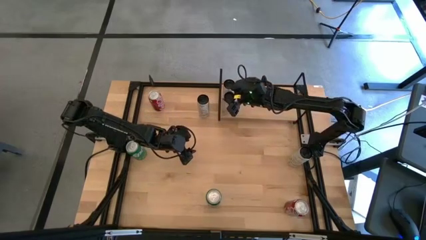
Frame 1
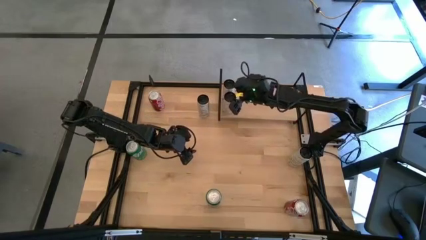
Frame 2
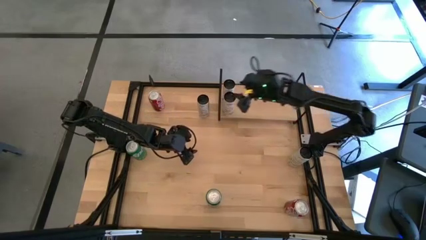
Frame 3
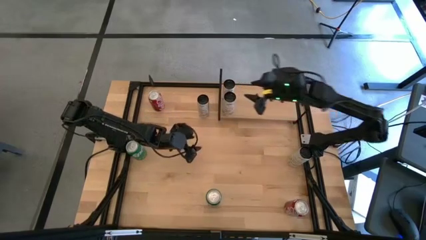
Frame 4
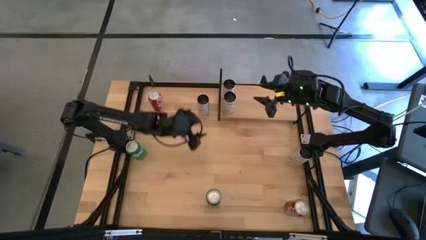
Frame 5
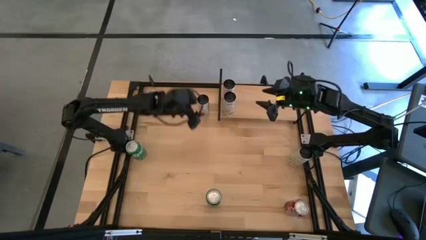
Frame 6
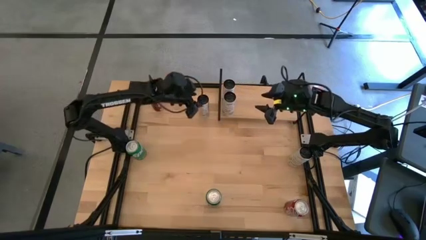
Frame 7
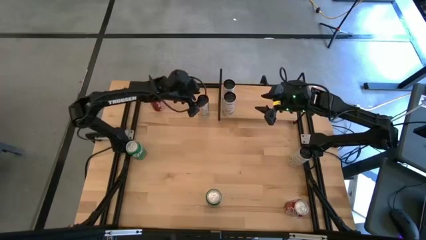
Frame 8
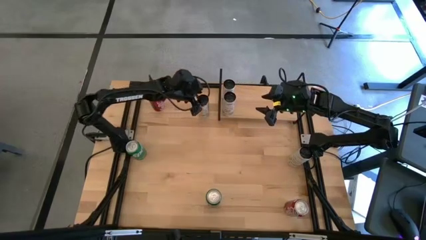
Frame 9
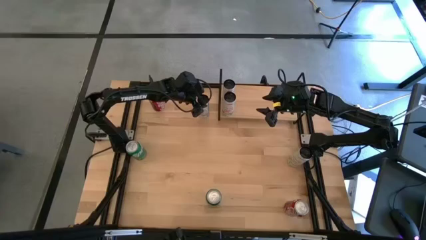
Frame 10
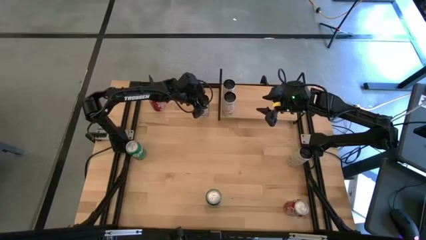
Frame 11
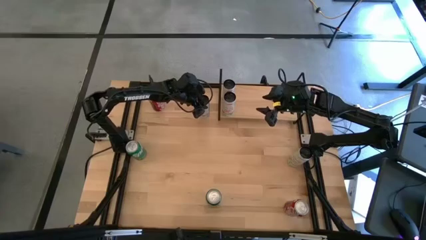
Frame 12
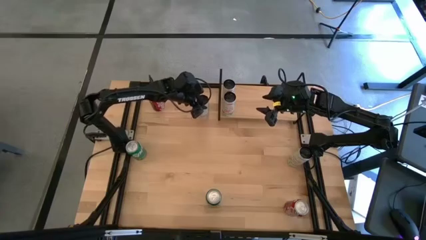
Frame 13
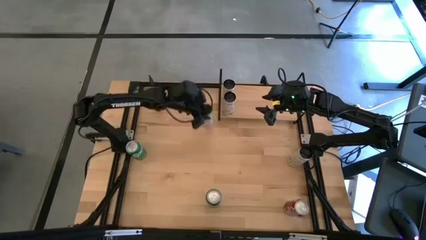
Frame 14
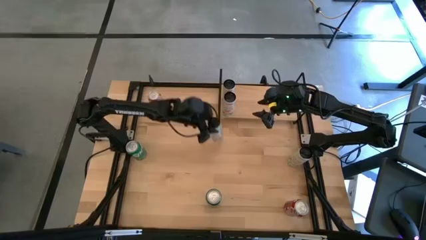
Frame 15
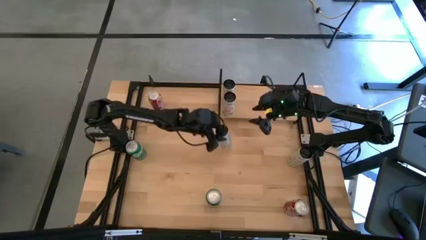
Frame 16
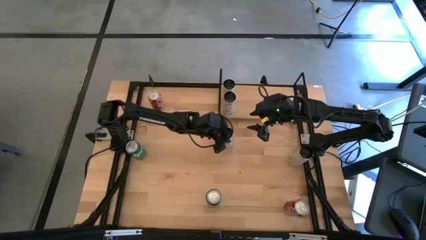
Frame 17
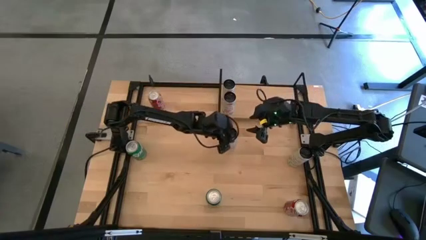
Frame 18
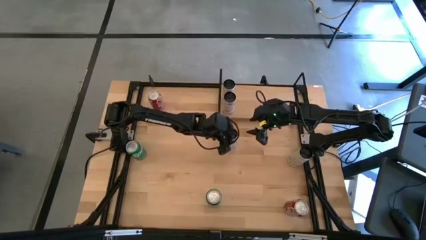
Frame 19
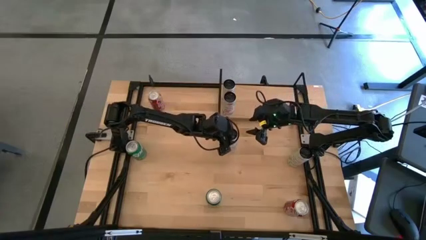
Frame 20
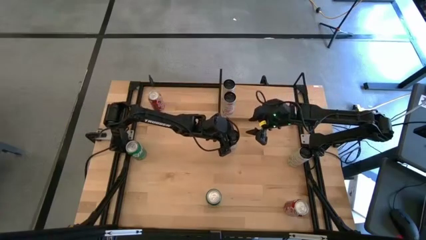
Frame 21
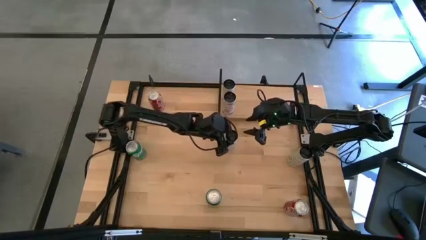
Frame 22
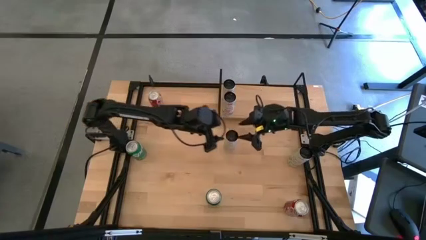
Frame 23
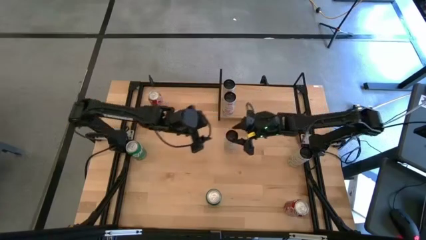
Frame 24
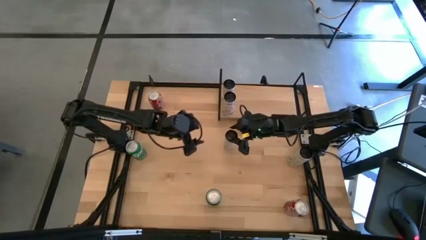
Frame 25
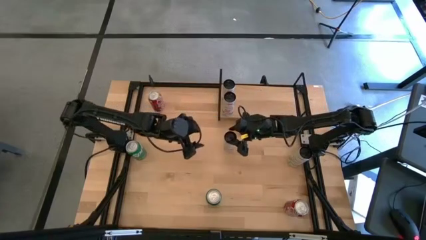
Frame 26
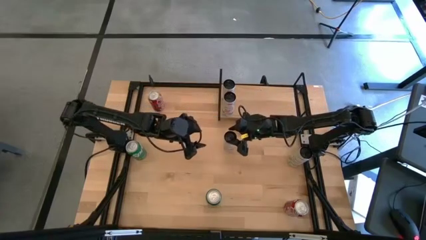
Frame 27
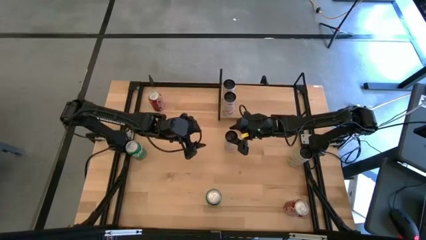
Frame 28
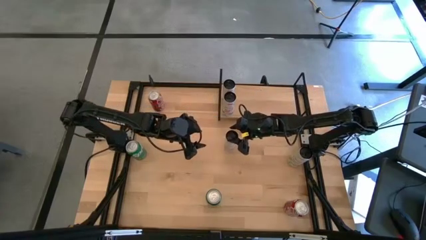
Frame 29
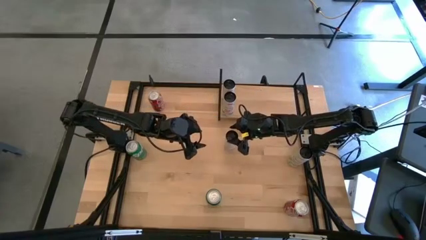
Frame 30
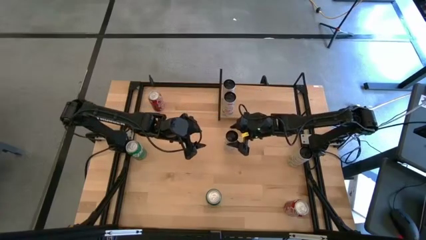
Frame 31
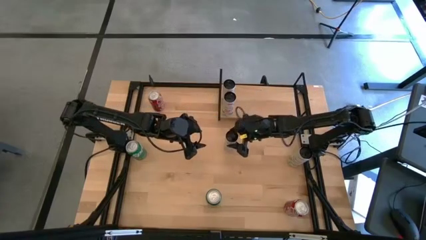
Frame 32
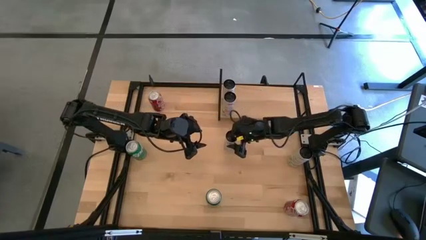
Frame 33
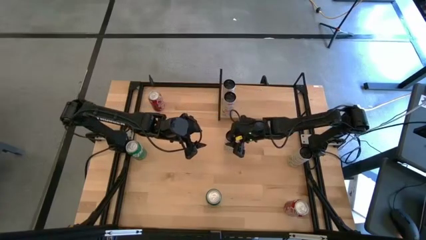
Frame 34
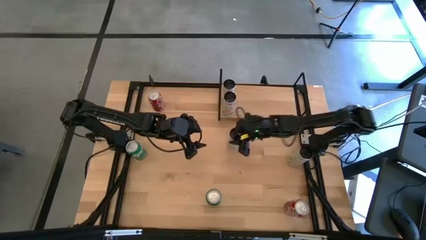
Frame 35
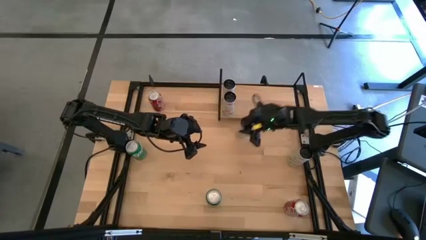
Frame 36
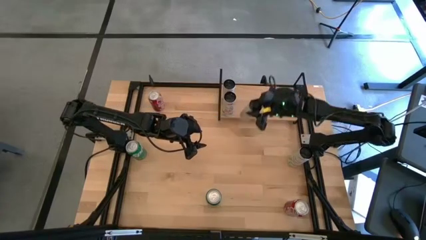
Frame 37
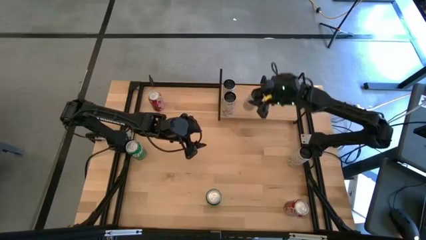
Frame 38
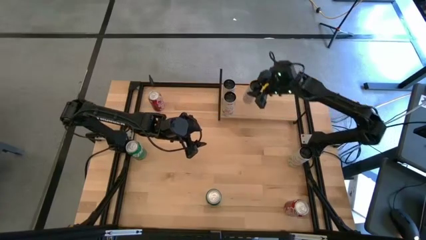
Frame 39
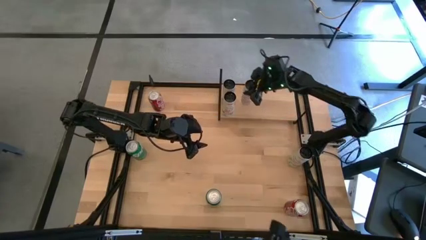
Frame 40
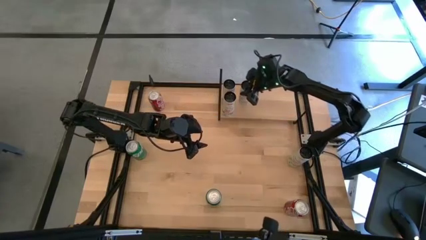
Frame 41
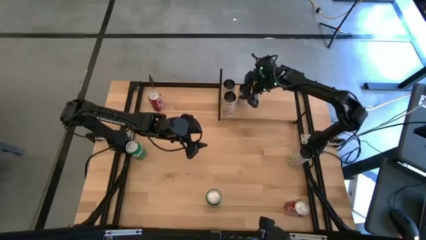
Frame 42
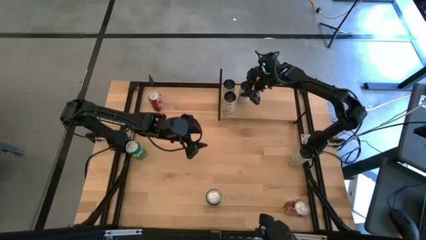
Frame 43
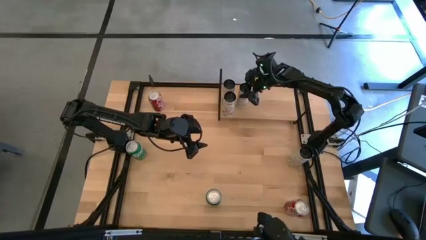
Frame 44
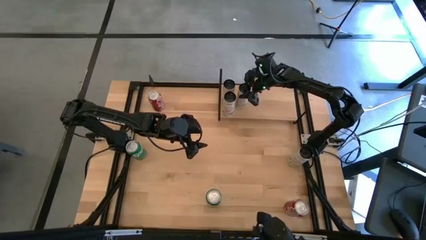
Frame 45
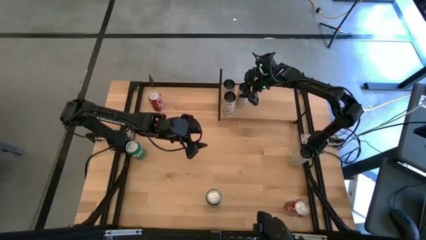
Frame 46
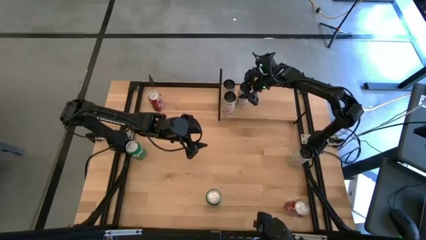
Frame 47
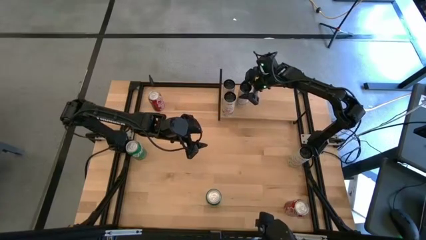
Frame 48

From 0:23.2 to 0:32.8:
Task: Place canned beverage on shelf
Put the top white-yellow soda can on the shelf

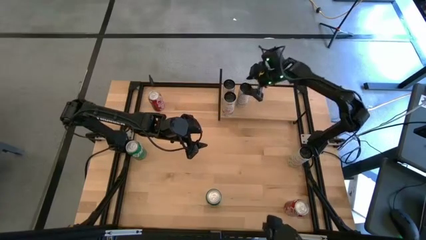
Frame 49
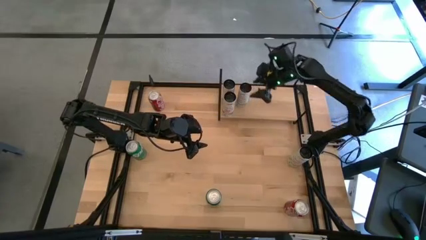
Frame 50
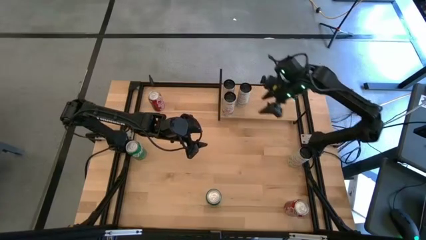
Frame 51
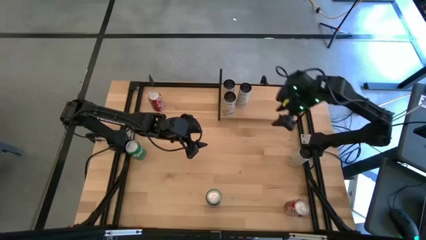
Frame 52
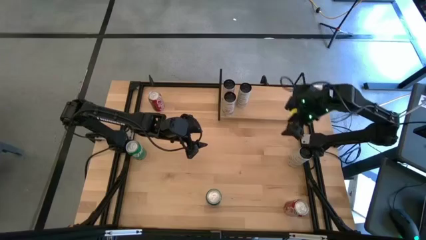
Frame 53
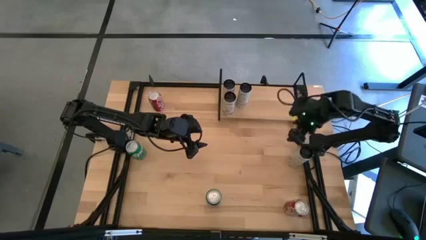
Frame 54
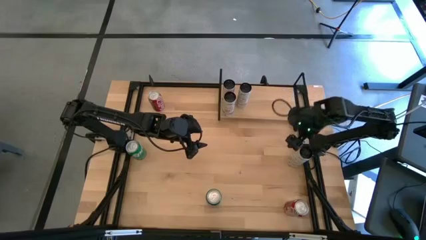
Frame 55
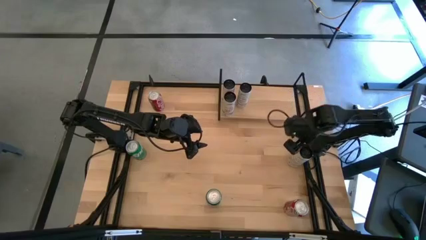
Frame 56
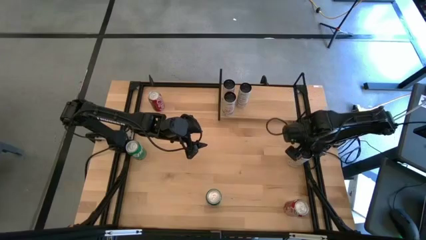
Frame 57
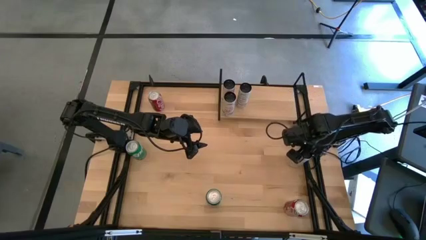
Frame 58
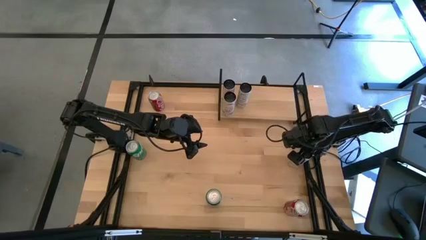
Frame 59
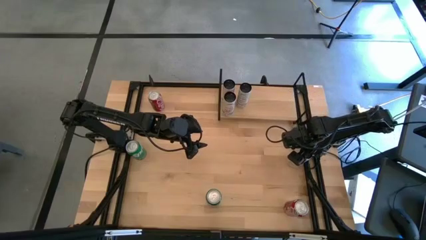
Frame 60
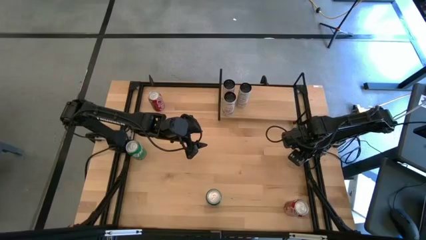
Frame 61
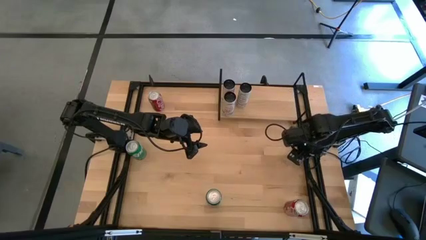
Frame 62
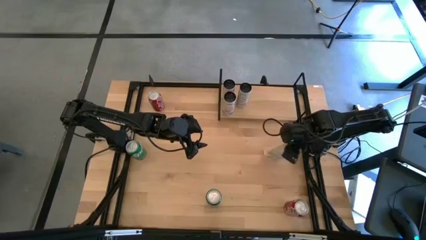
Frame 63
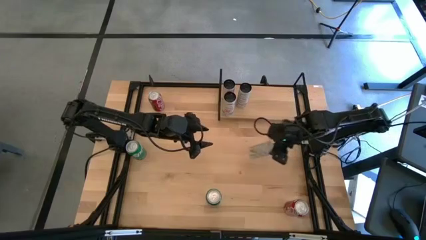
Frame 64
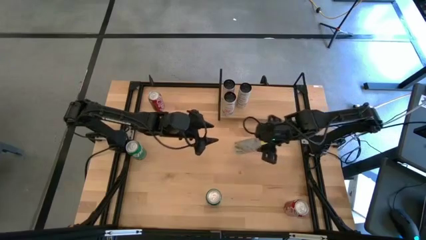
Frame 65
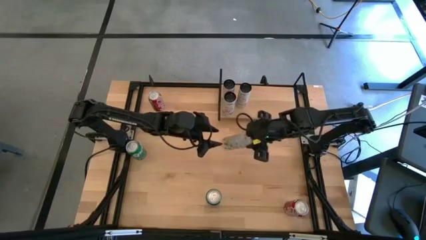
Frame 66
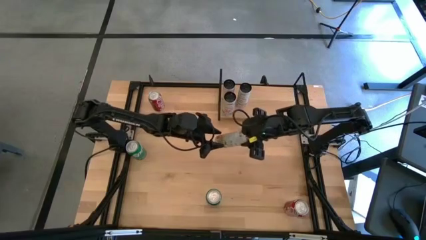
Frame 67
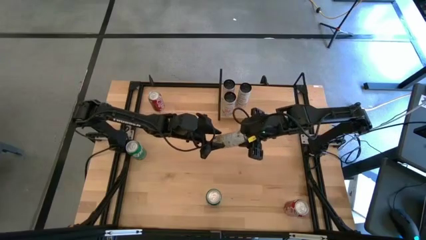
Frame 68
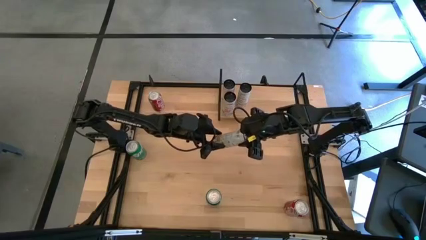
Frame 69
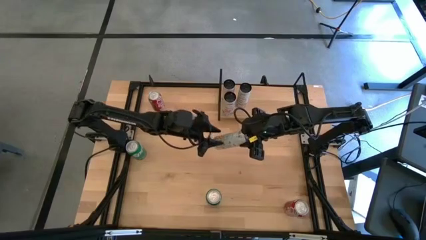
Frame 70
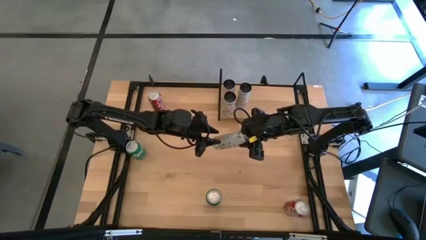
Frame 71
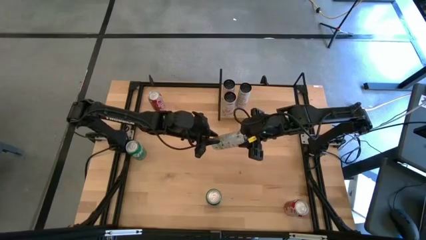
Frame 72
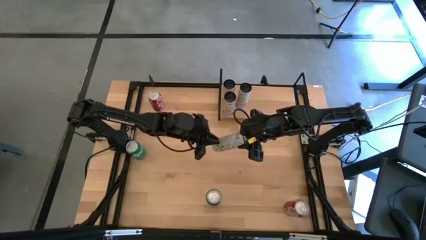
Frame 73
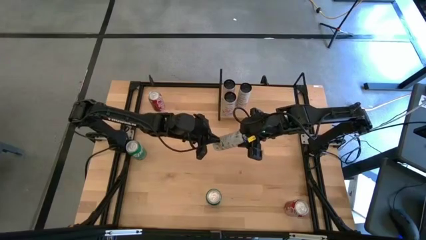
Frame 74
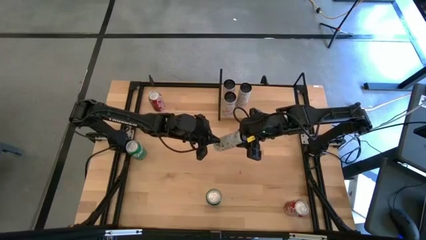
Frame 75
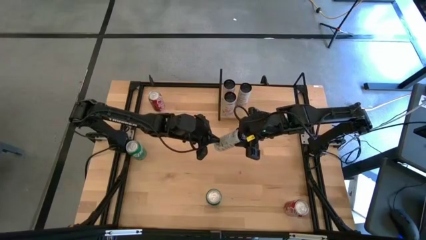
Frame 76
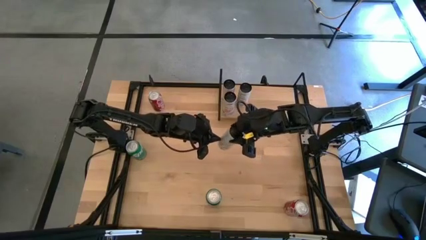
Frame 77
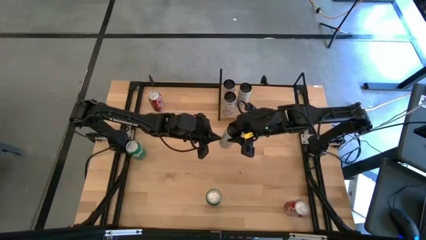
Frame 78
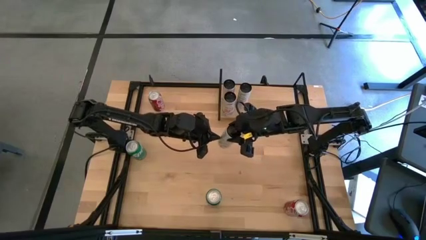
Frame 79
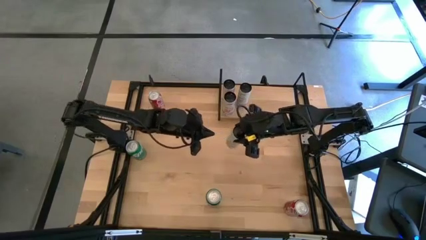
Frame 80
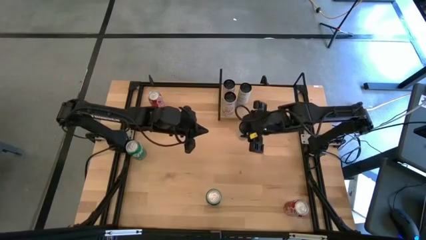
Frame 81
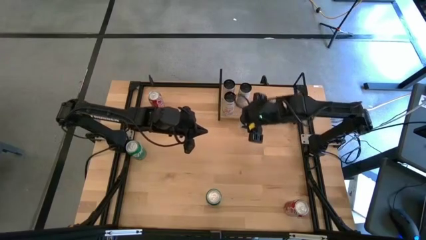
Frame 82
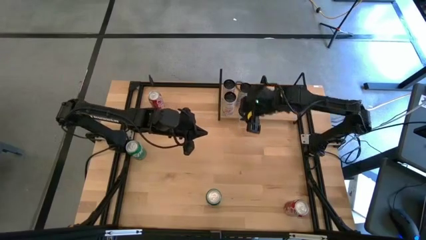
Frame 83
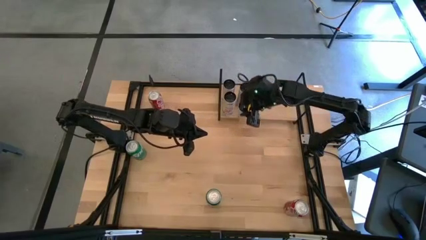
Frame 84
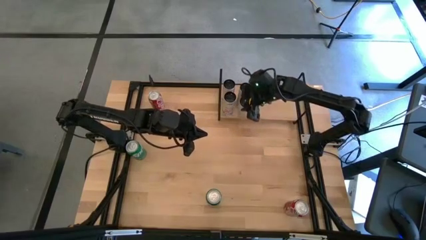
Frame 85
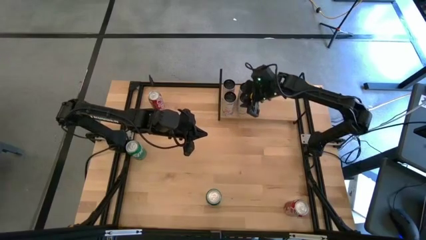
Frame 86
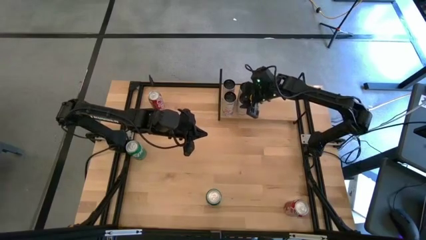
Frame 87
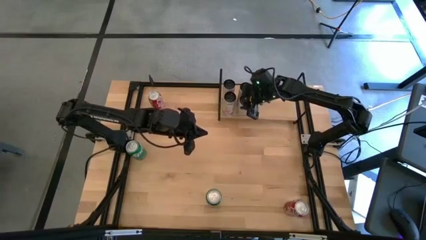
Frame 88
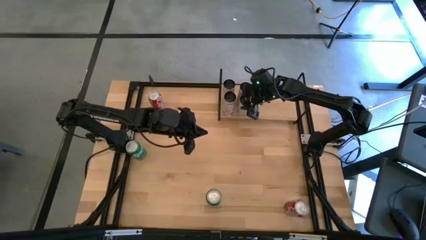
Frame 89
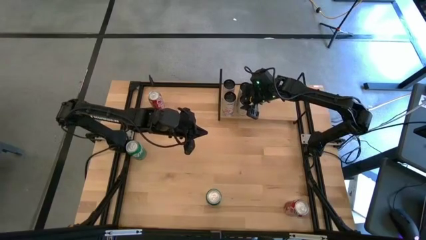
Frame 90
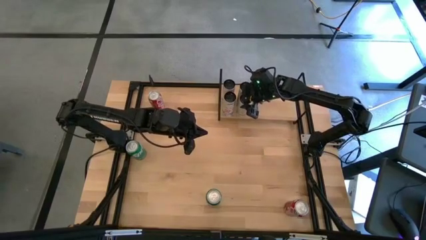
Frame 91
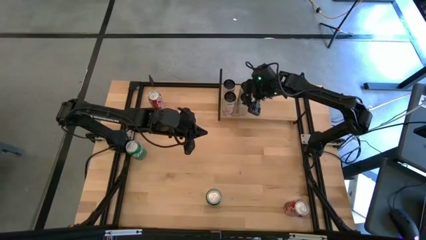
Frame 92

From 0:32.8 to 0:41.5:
Put the white-yellow soda can on the shelf aligned with the other white-yellow soda can
